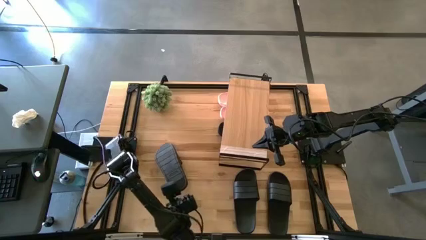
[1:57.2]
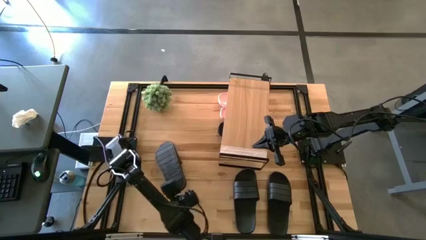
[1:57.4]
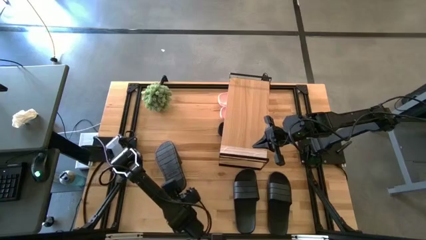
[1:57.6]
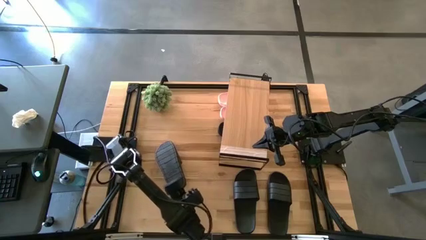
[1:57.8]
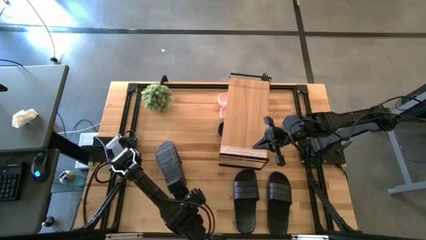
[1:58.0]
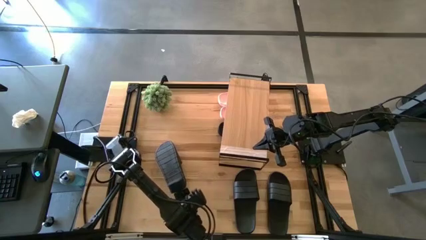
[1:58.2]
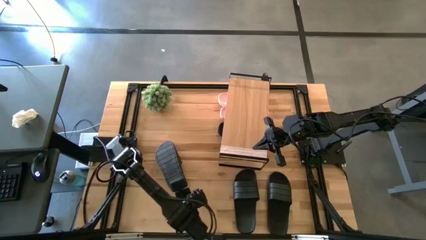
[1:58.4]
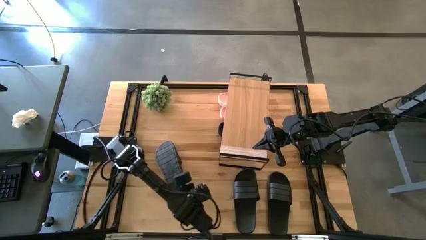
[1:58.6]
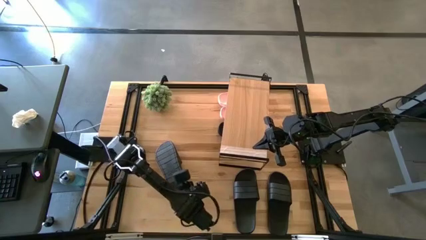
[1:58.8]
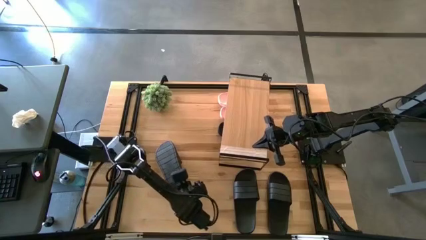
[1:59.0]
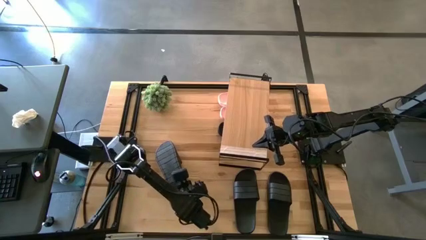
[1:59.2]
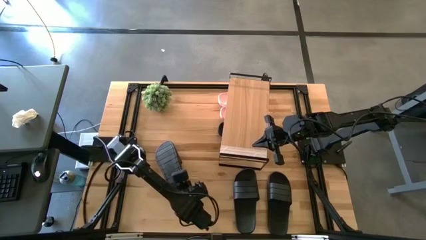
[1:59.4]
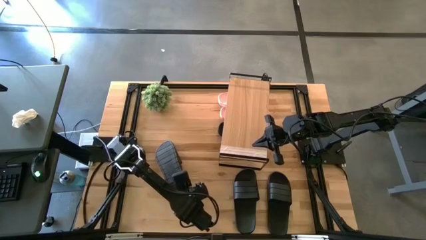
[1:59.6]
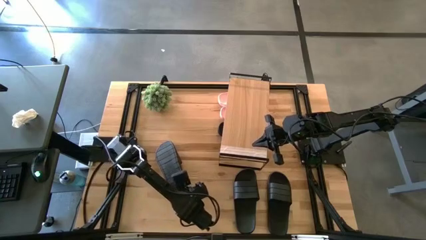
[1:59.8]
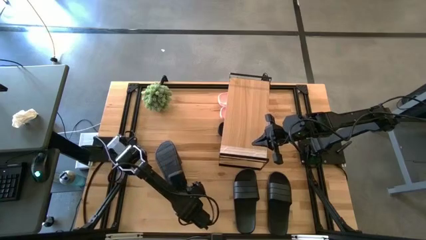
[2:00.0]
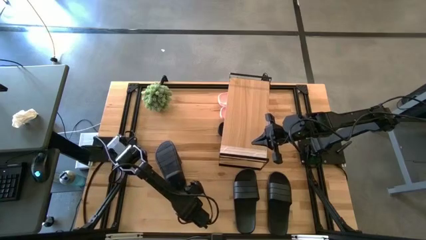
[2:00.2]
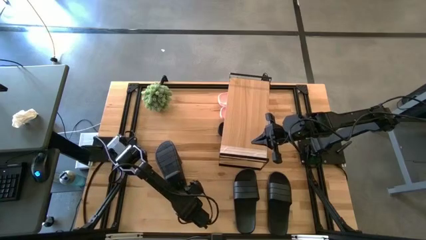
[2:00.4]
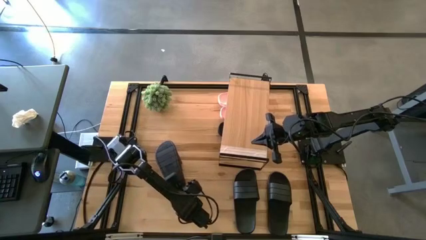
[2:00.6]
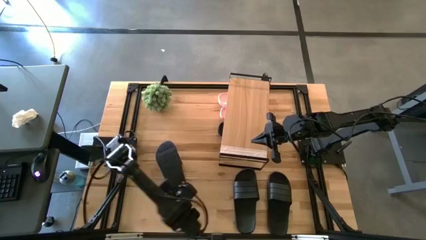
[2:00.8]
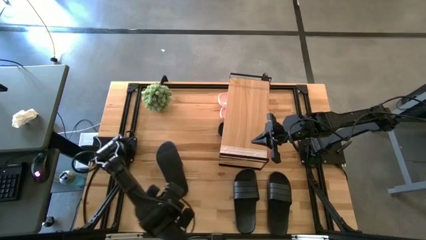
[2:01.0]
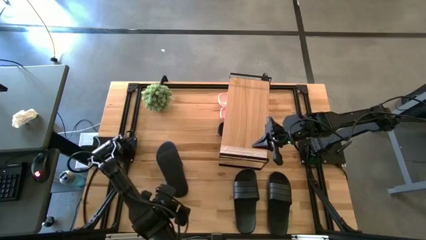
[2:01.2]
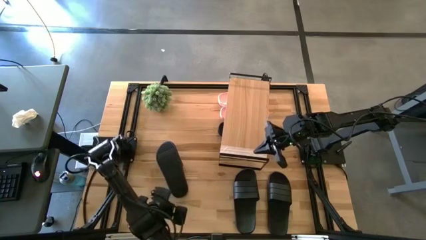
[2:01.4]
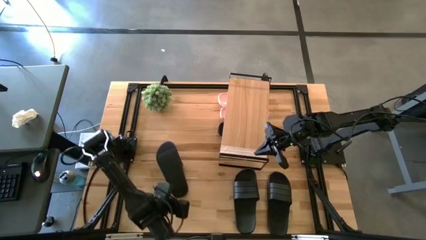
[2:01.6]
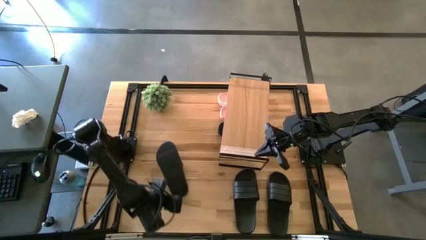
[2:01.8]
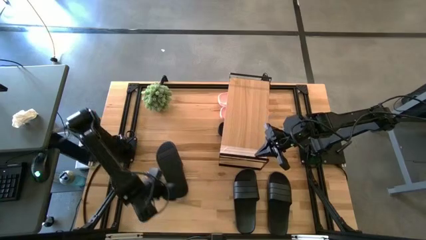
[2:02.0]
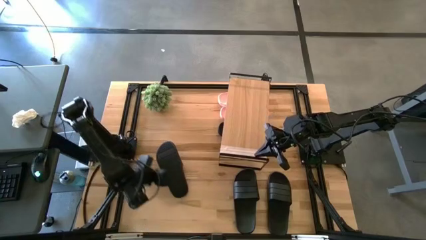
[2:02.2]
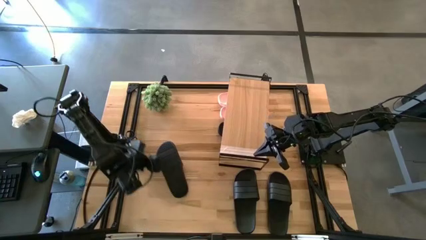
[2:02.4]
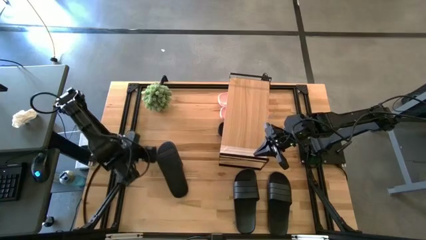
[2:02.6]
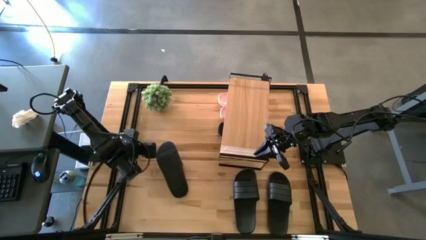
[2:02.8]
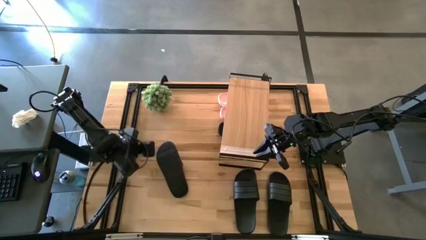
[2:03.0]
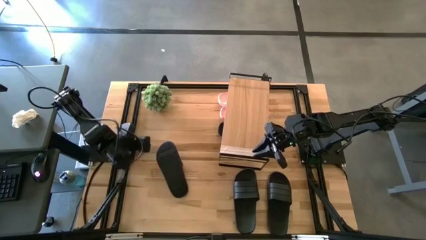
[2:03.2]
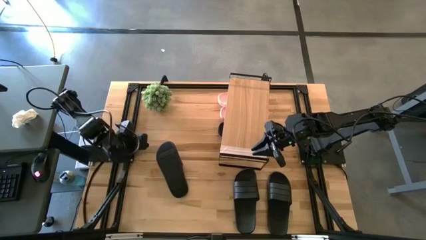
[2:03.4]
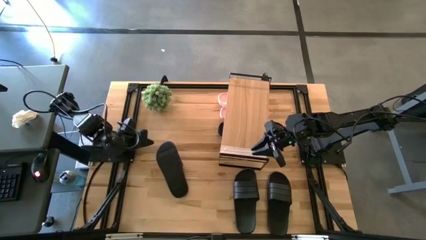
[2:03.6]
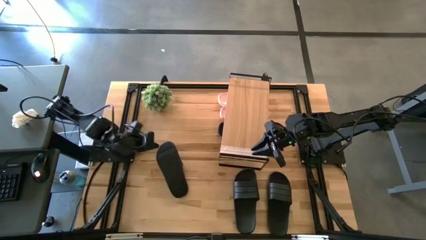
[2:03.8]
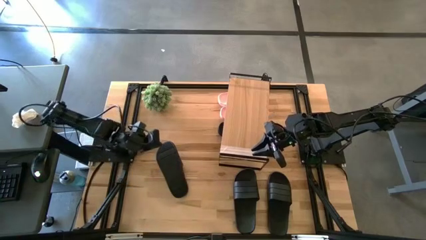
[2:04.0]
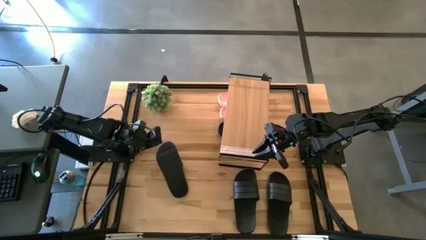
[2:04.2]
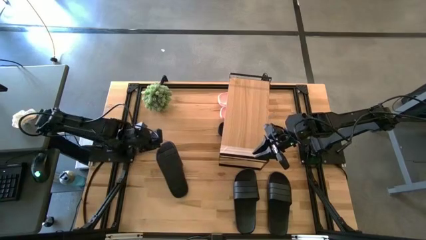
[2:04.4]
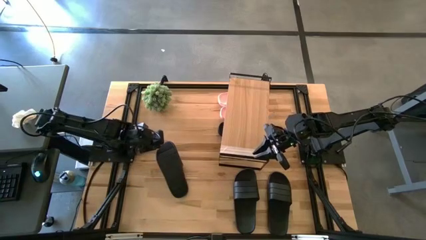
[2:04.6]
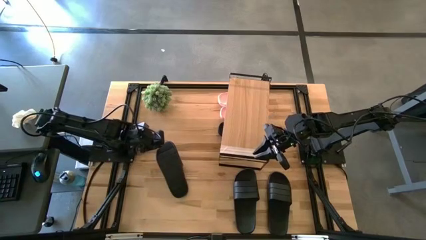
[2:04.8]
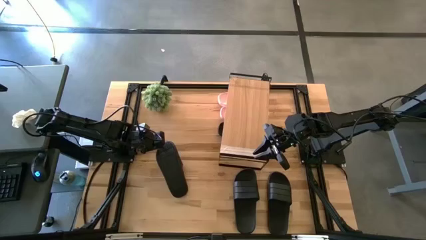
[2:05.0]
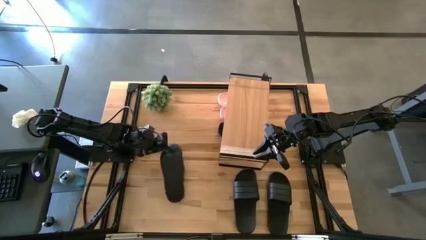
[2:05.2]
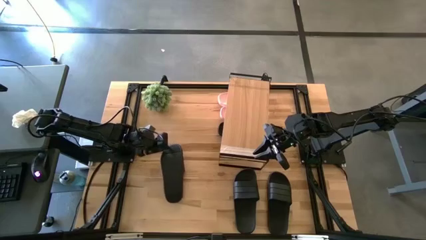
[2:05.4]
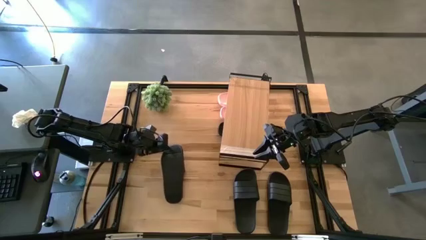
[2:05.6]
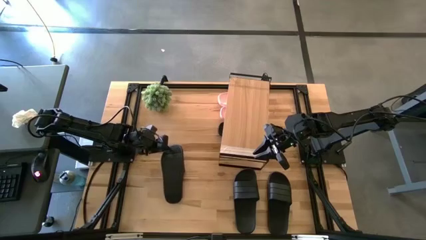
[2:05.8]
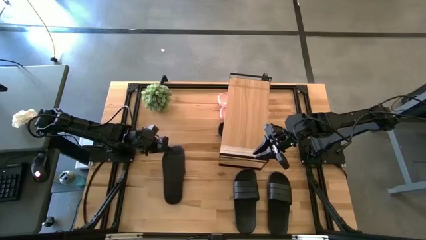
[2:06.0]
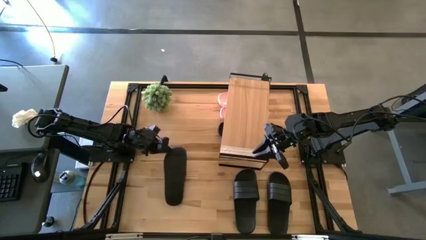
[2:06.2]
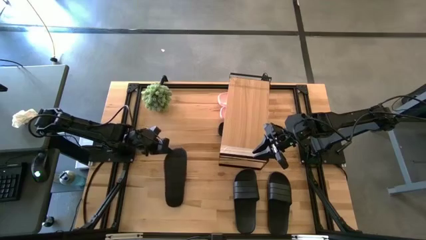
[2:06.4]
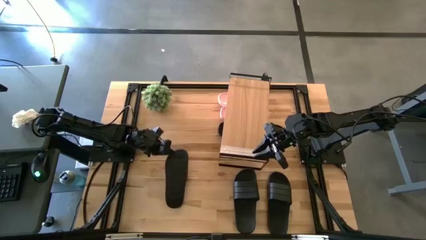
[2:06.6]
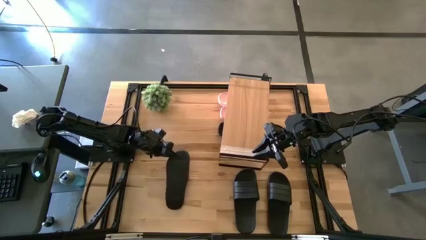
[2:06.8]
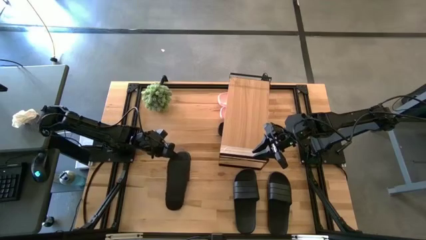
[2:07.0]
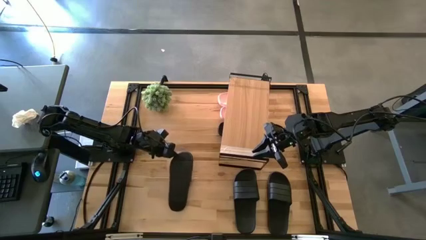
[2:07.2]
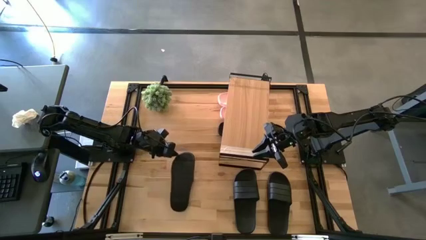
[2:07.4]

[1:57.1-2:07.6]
Task: Pick and place slides into the shelf
Put the black slipper under the shelf

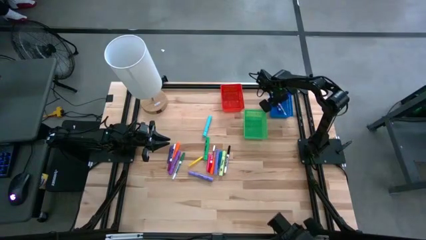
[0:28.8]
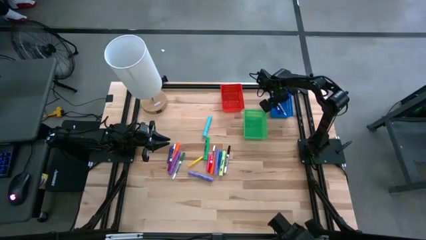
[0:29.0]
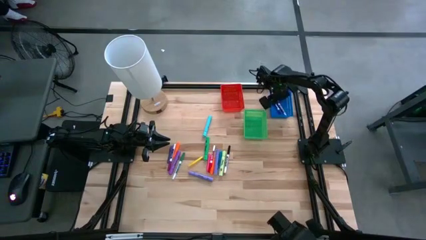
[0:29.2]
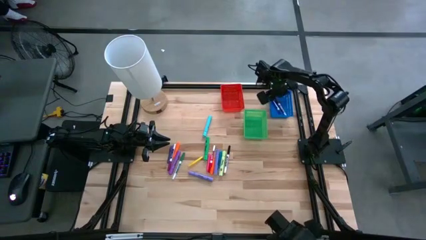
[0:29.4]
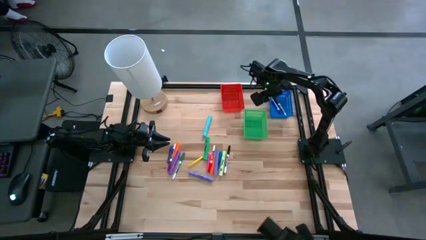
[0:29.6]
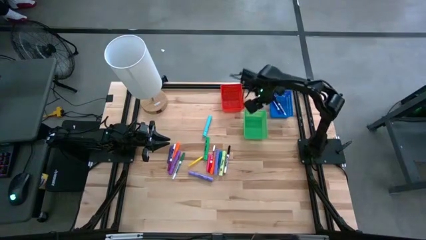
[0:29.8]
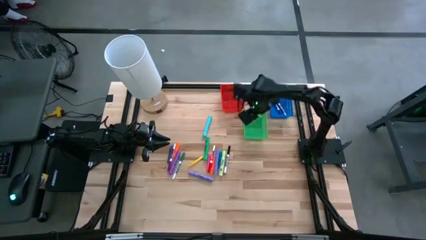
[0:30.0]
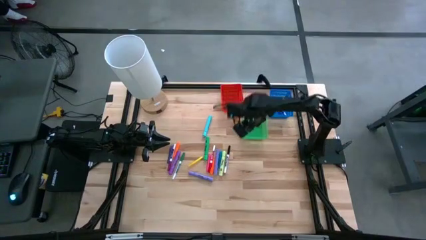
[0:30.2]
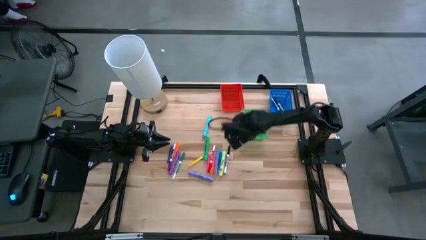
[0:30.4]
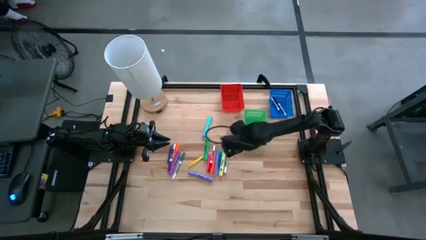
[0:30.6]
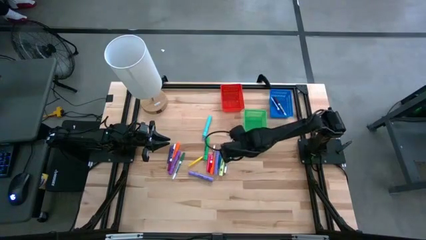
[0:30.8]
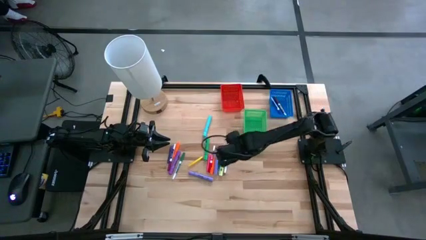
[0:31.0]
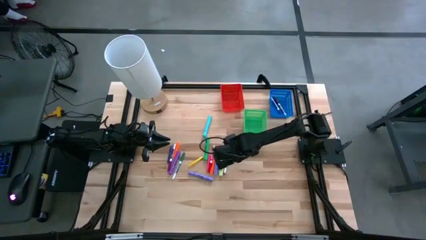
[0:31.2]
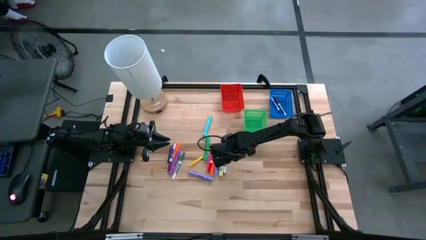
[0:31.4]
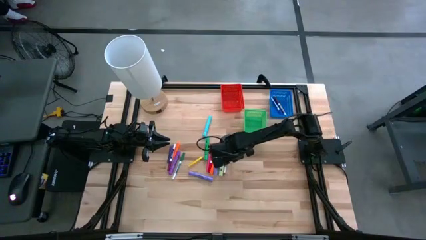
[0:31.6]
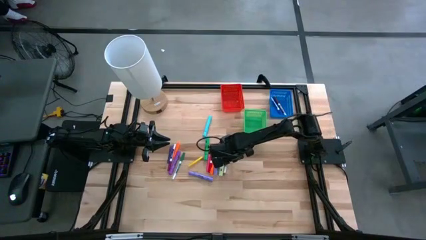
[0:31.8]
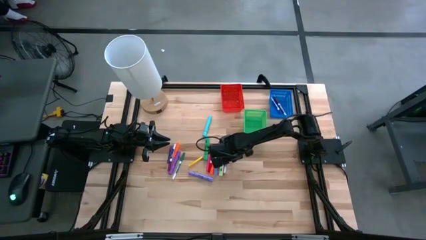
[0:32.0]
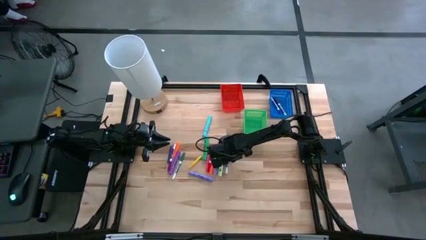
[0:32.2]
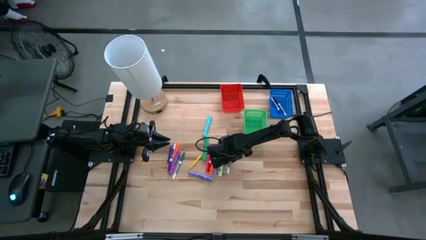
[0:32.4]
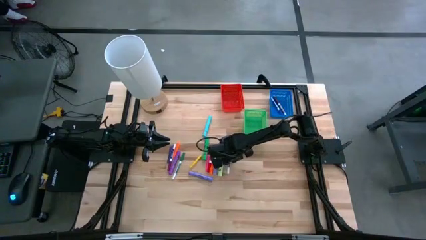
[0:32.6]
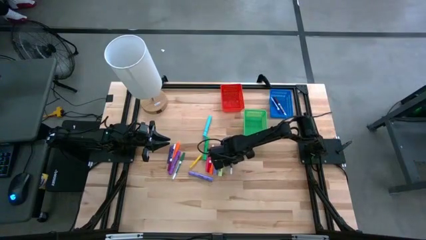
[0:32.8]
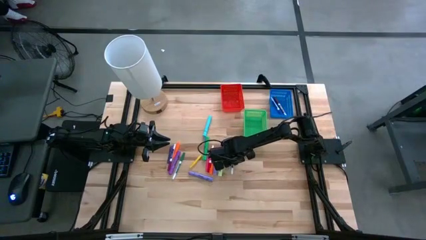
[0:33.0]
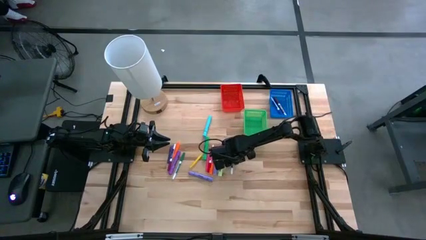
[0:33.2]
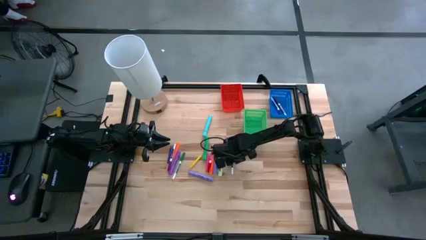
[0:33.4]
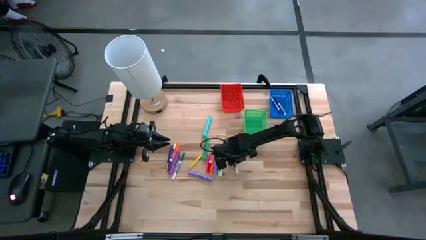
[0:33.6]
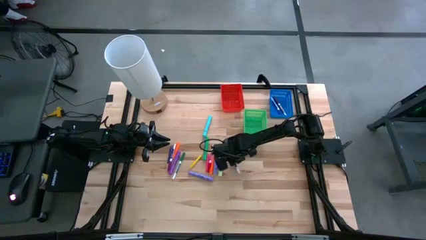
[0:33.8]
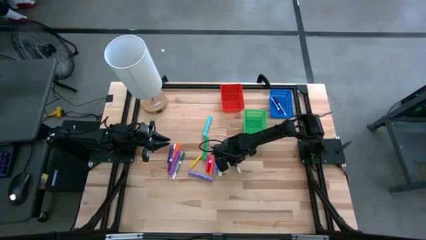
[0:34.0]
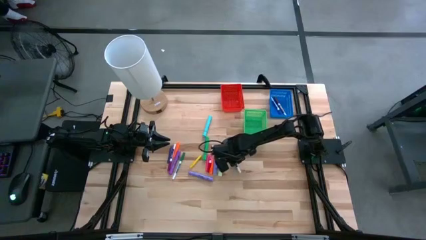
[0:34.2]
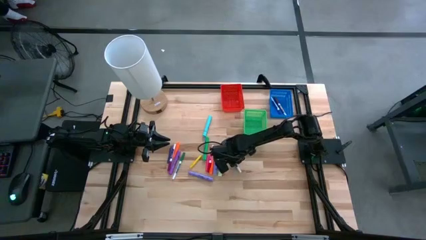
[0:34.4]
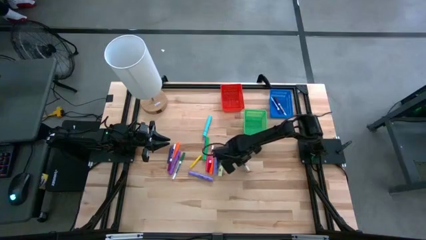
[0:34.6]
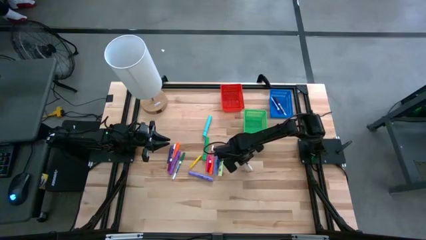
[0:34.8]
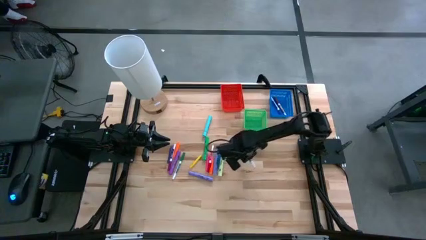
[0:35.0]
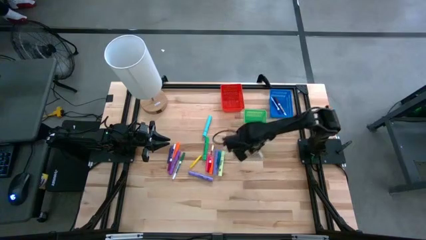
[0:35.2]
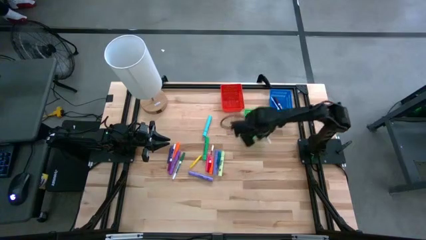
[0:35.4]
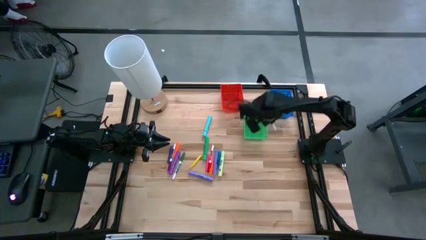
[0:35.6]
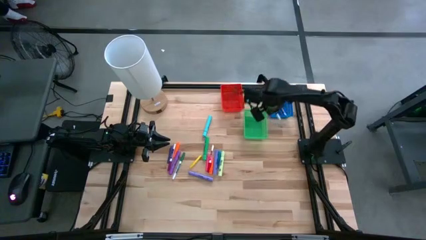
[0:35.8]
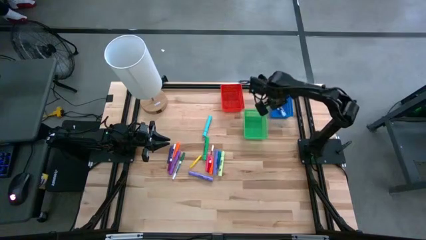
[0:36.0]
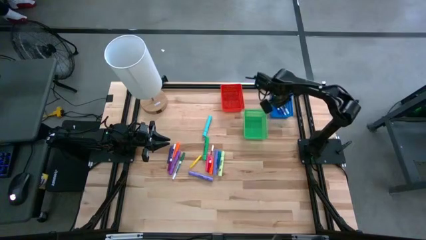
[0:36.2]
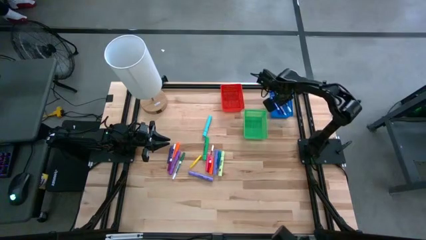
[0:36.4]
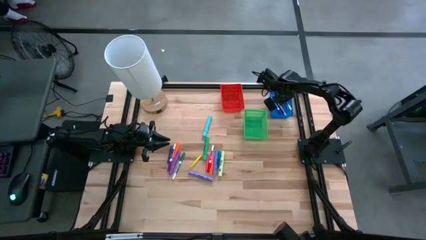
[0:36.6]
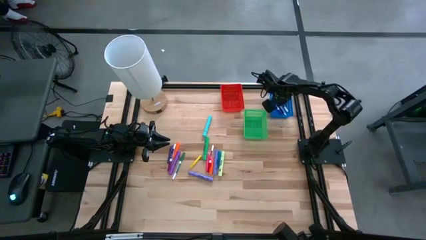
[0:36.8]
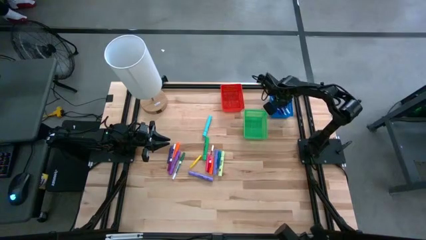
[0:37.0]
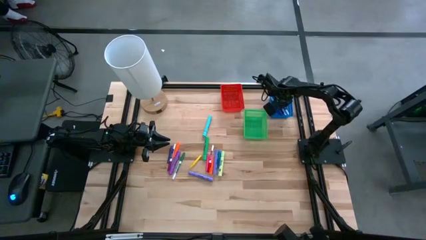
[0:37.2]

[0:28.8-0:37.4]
Task: Pick & Place Markers
Put the black marker in the blue bin
